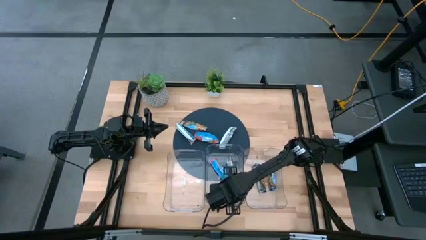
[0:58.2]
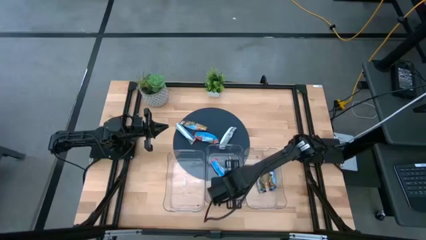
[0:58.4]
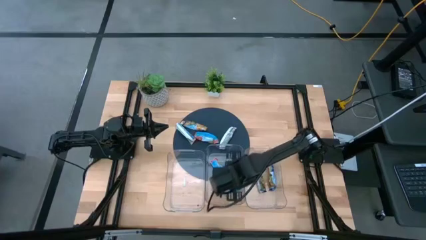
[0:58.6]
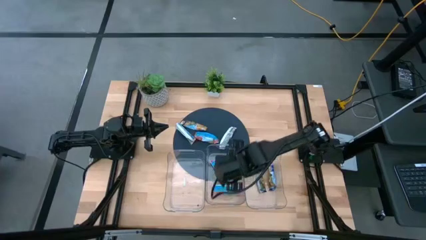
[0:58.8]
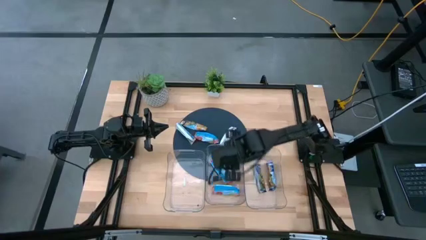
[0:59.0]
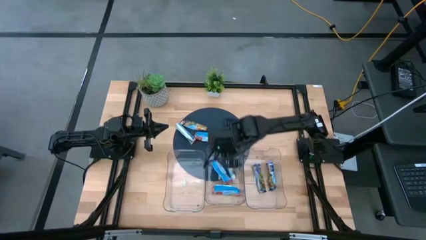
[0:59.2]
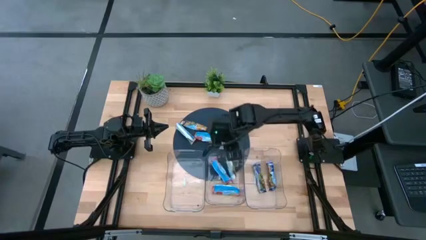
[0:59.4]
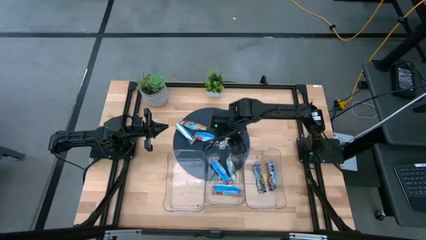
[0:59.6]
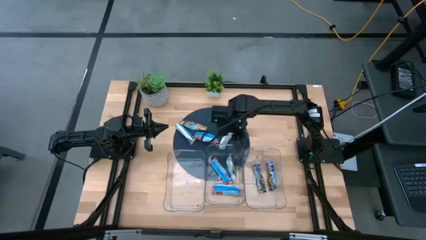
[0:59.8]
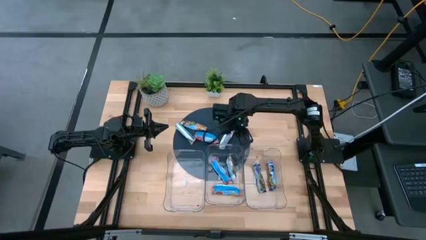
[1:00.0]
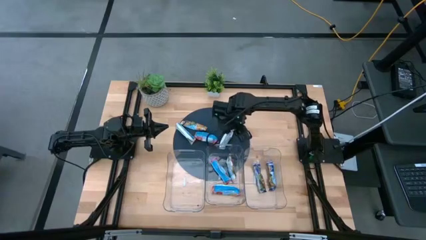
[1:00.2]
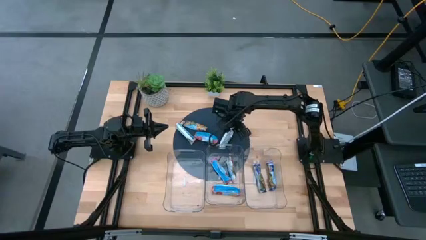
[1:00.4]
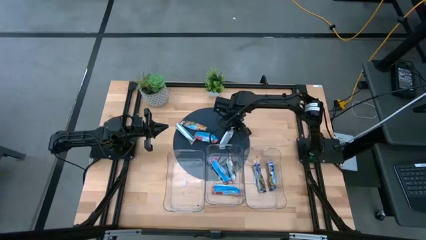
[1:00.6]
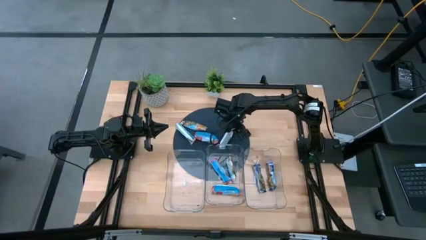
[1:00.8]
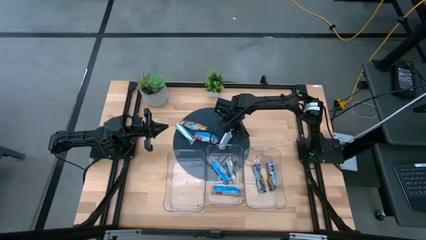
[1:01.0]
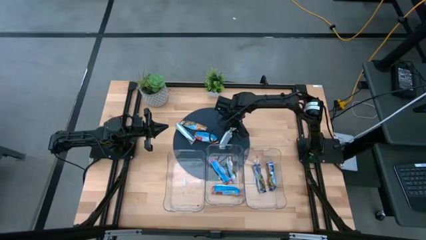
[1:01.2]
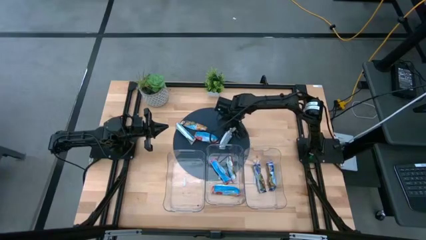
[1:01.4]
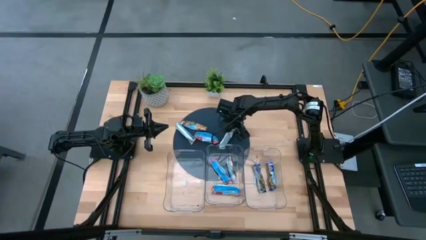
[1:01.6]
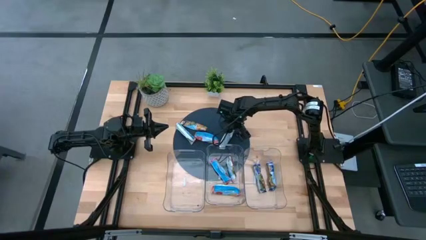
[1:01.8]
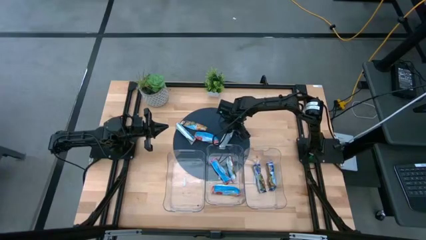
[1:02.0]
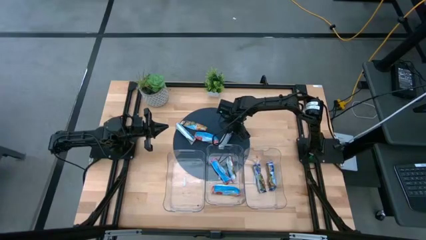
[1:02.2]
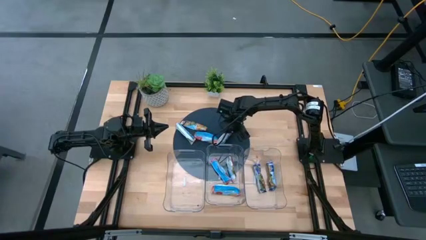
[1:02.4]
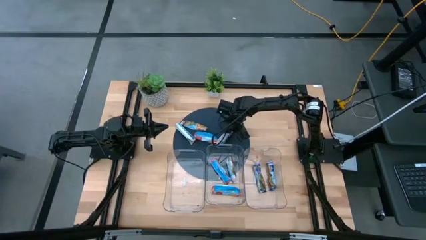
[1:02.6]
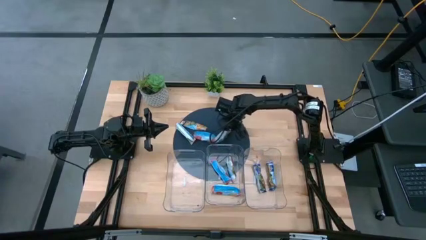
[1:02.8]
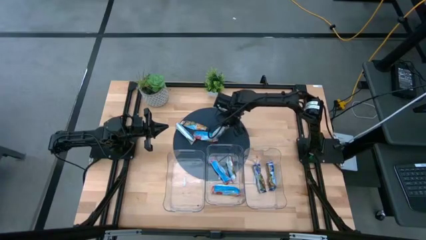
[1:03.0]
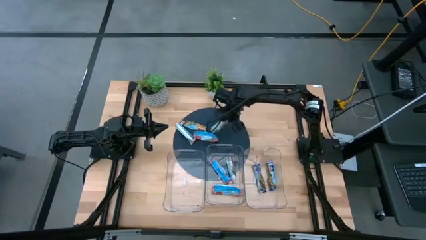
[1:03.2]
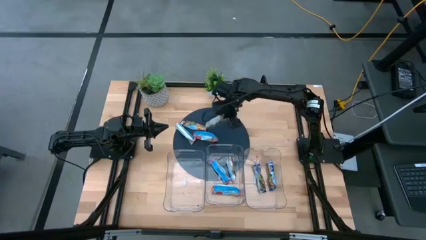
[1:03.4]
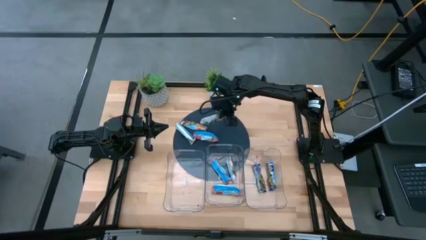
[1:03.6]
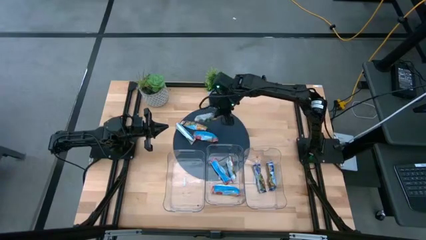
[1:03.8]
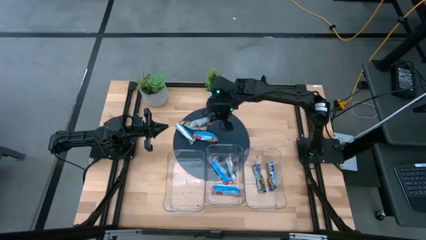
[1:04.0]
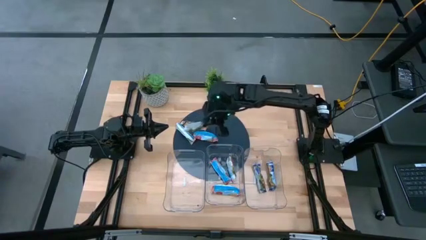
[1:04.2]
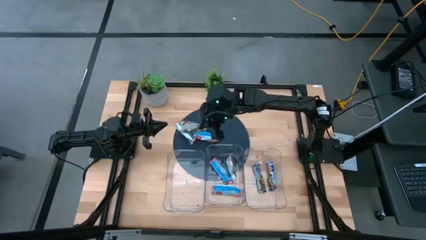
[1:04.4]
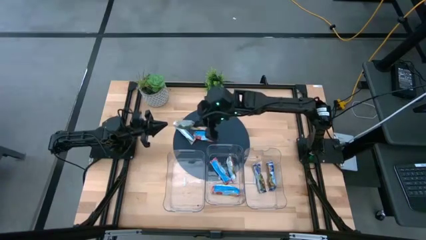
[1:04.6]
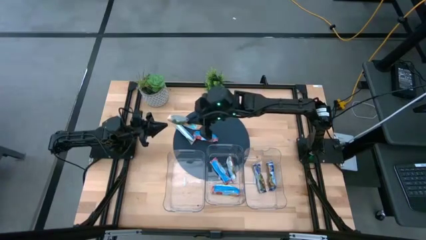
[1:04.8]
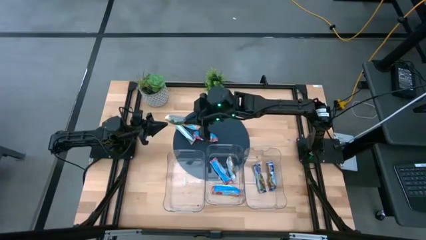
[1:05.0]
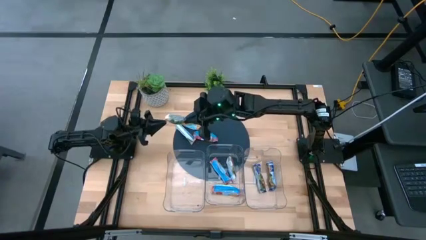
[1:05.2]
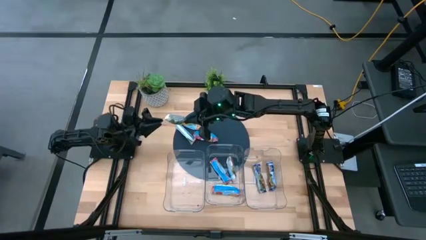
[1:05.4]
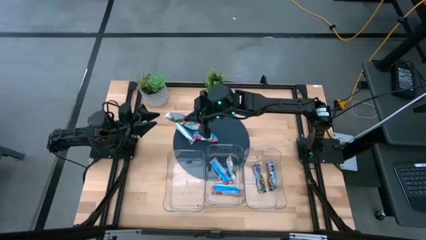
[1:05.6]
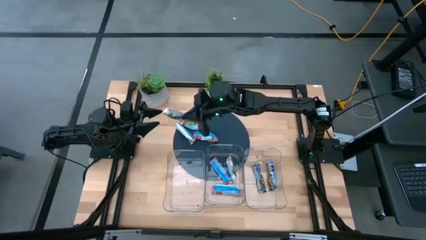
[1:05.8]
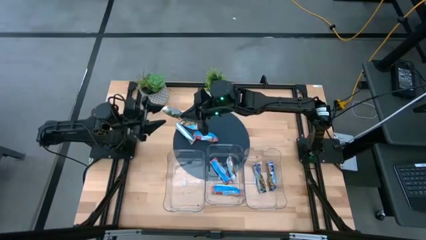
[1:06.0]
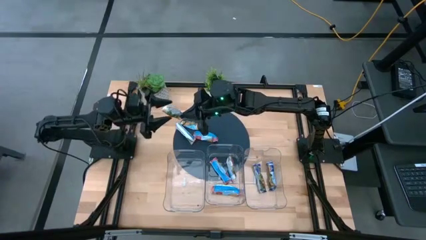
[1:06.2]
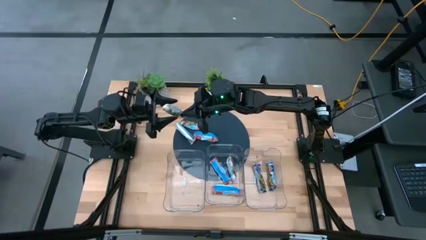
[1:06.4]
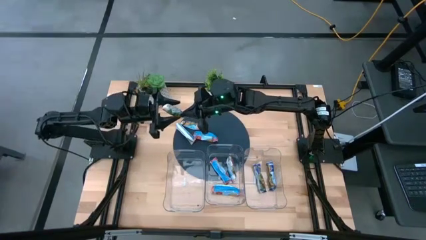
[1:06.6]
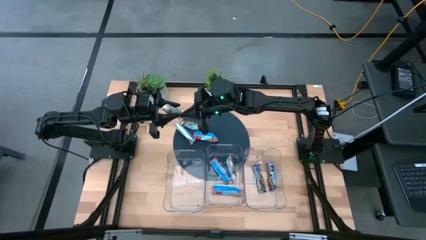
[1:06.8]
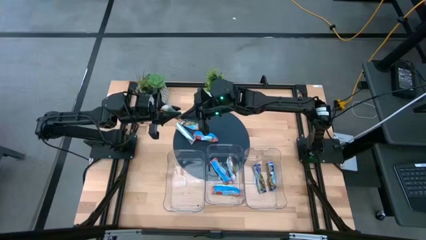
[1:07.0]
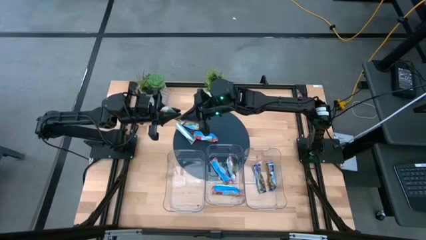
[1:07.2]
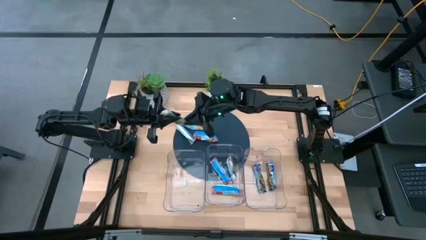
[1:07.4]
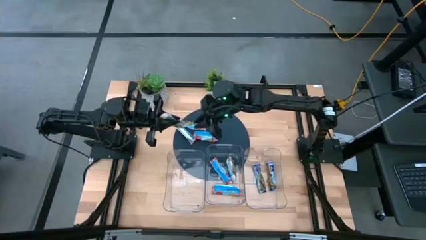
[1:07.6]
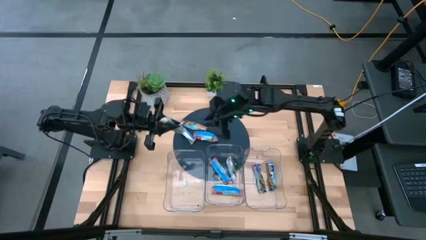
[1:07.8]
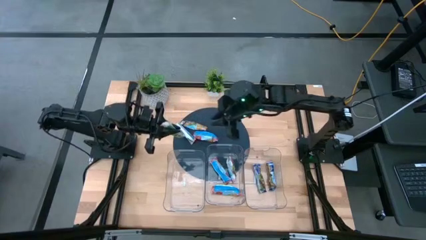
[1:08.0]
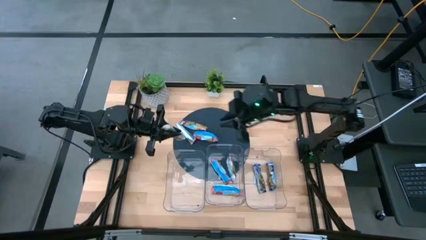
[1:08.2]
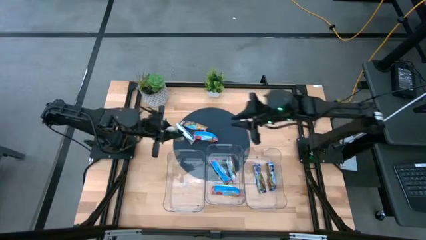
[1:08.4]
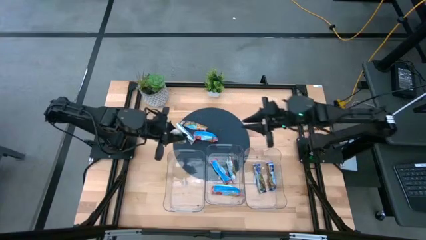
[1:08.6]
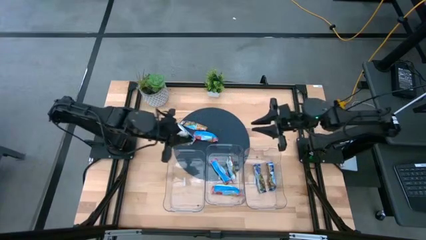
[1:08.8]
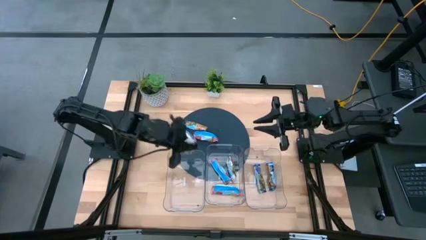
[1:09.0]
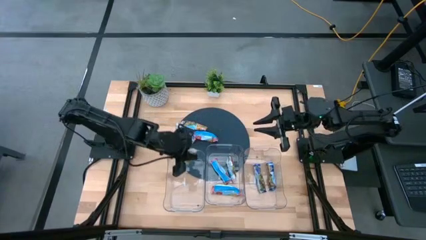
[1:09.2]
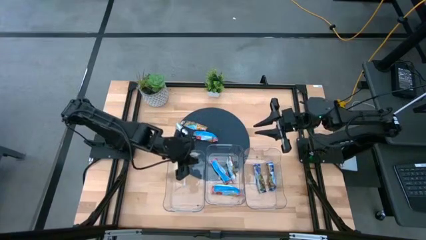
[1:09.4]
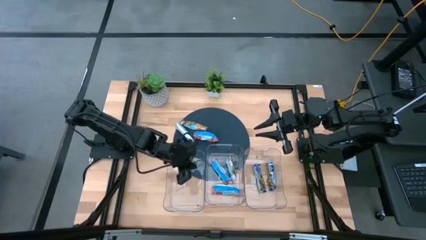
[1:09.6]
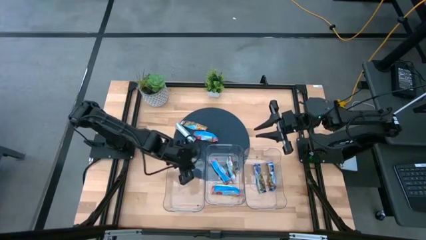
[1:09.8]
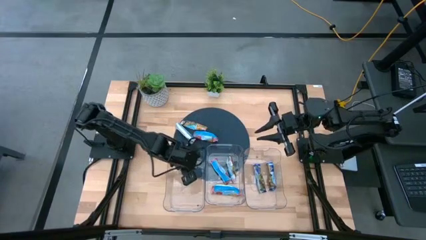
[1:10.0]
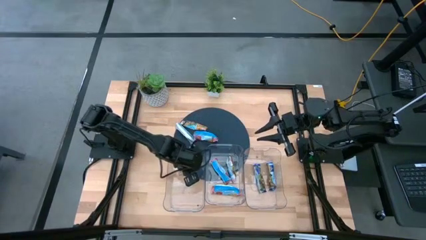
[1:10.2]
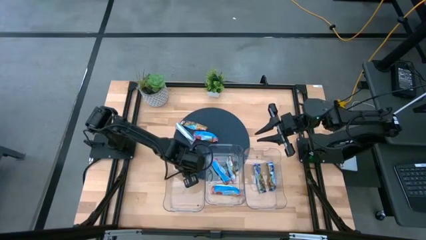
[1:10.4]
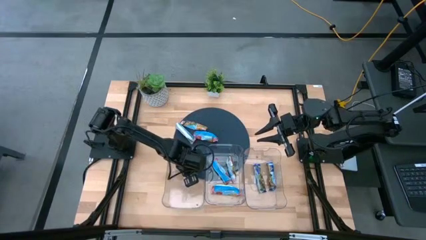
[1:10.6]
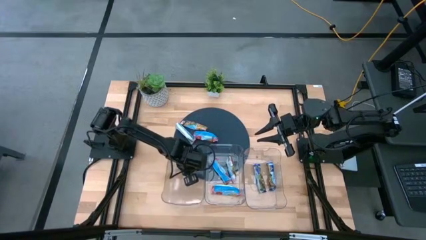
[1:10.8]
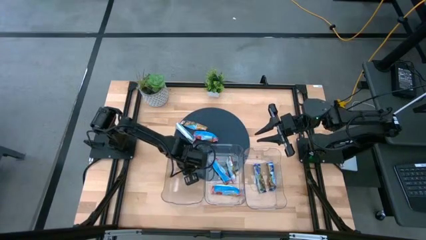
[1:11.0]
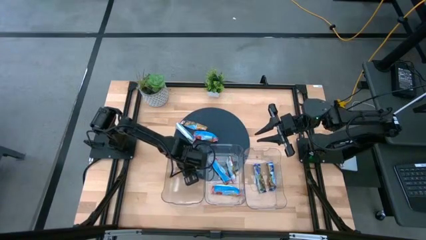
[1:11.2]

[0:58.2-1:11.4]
Task: Pick and place Granola Bars by type
Put the orange granola bar into the left transparent bin

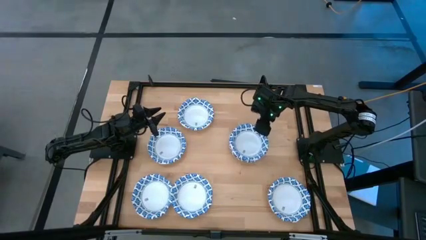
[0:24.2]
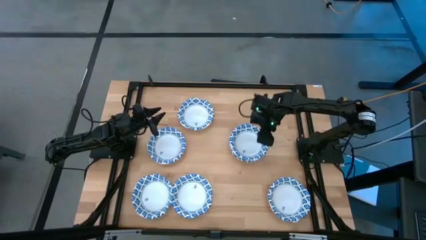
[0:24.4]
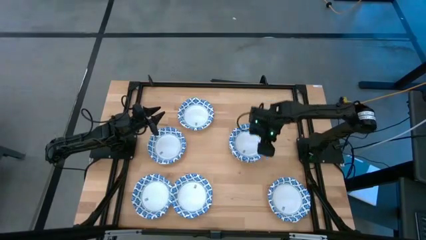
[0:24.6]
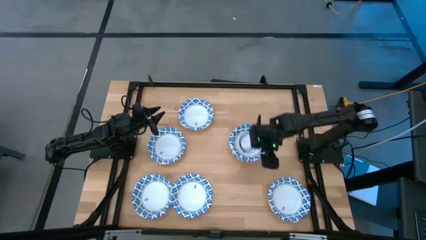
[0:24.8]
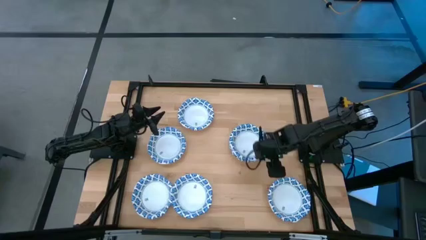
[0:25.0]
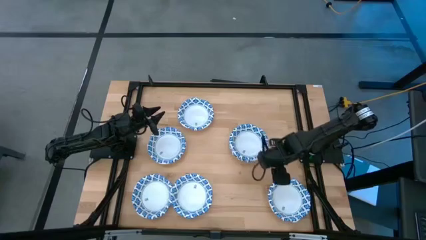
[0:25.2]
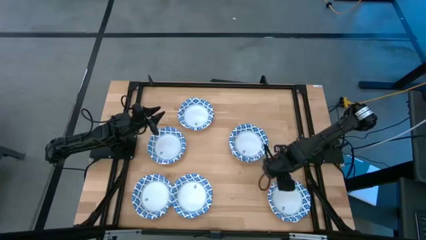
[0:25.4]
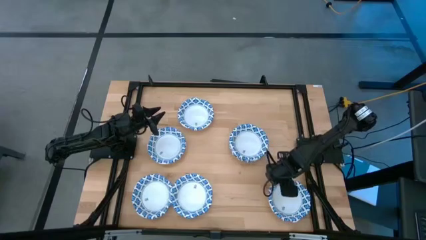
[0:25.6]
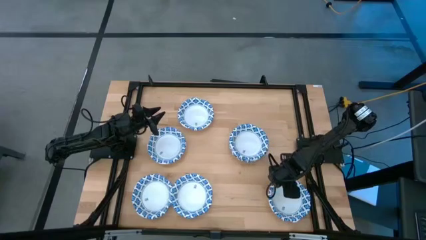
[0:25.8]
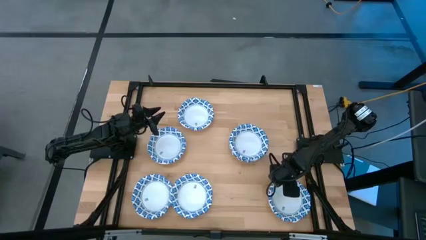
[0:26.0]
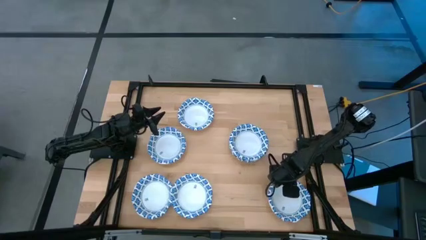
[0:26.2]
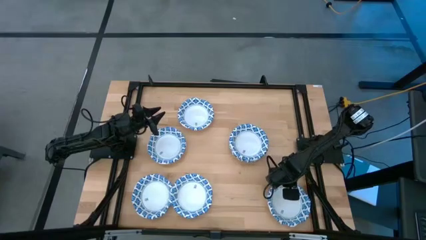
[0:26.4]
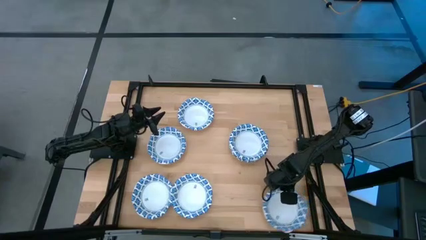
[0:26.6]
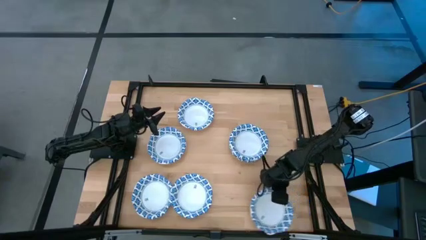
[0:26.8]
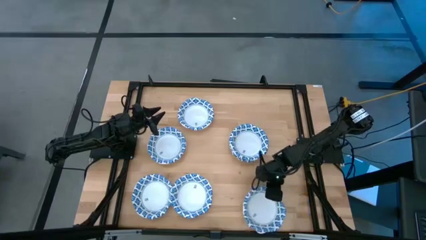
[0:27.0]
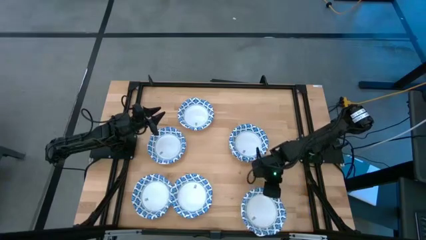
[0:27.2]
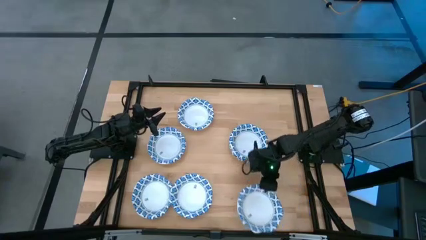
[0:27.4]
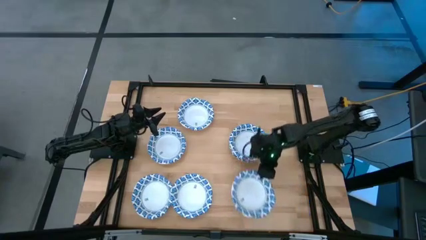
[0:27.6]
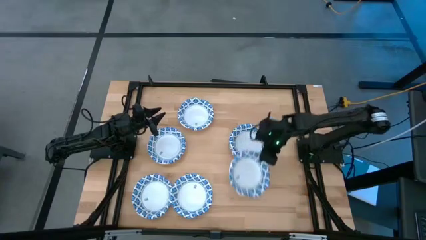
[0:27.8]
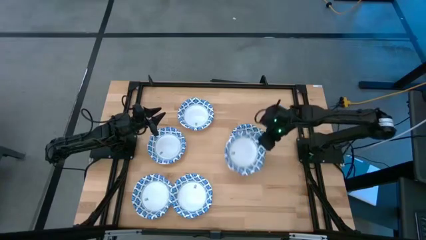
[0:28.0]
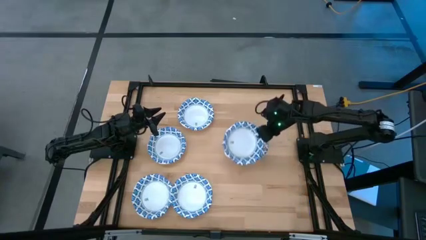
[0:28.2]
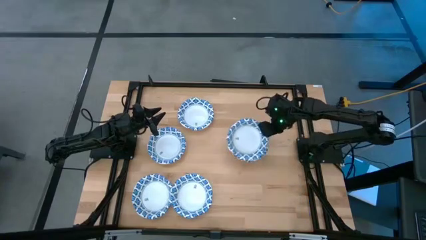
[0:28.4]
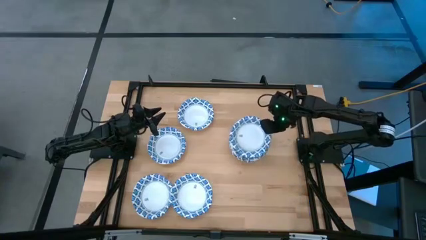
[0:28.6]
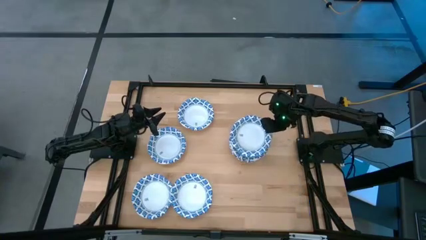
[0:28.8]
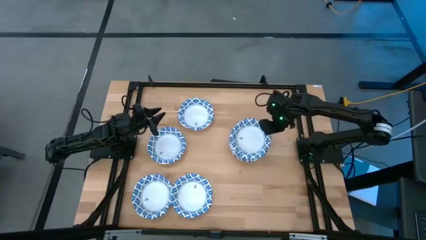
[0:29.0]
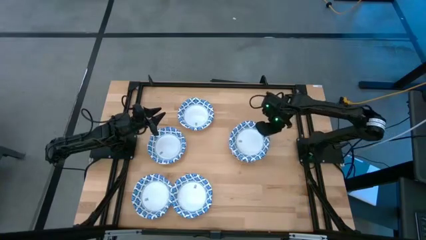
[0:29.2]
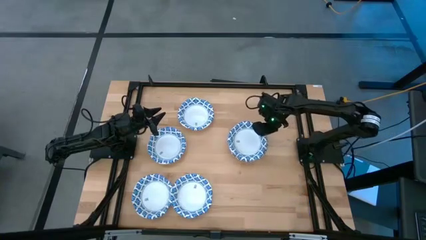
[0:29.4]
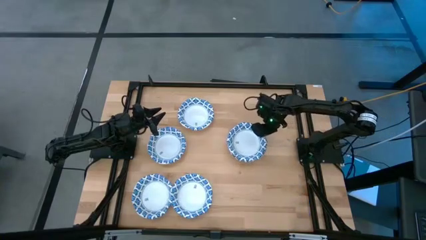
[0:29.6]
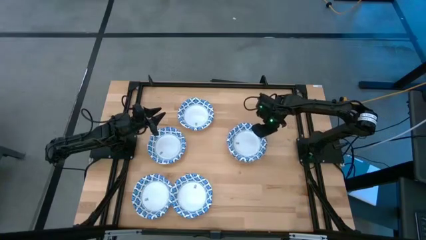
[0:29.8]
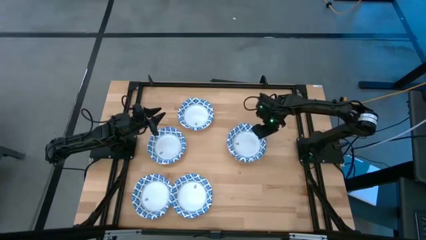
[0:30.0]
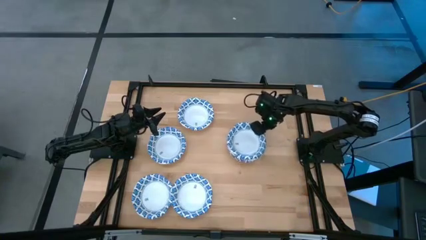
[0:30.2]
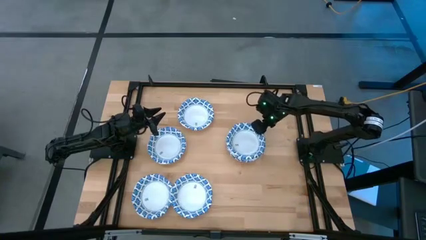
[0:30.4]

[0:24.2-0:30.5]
Task: Nest bowls inside each other
Stack the white bowl on top of the white bowl
